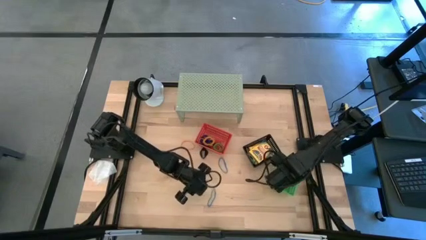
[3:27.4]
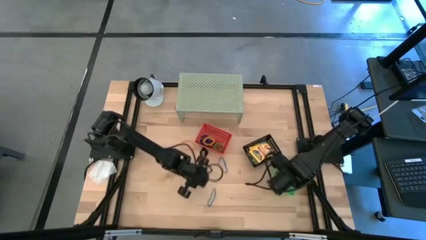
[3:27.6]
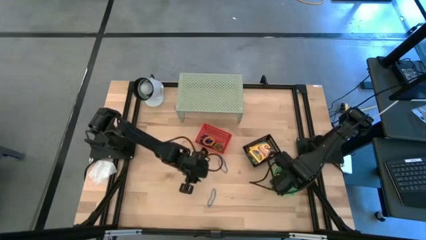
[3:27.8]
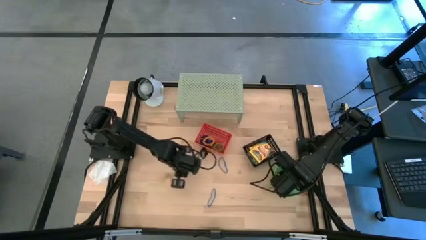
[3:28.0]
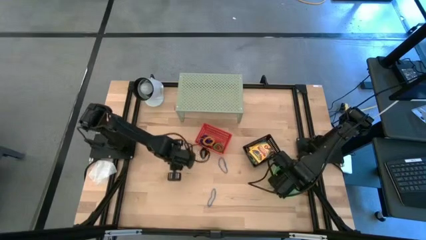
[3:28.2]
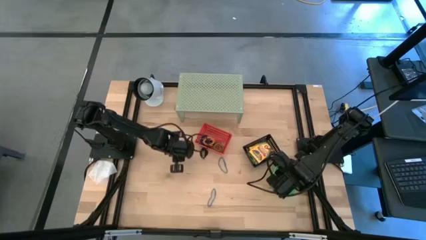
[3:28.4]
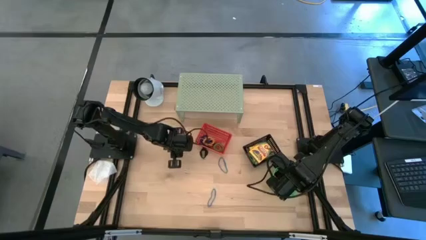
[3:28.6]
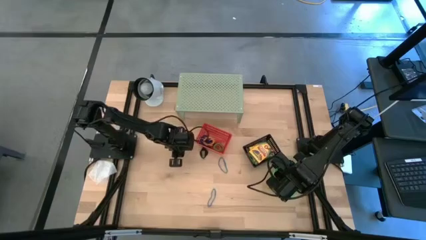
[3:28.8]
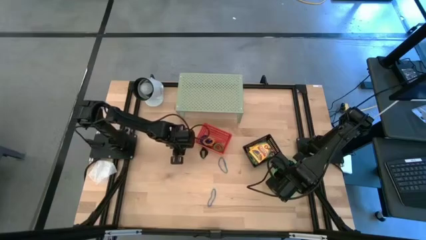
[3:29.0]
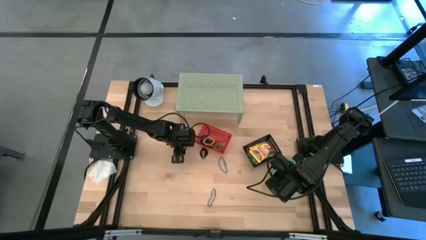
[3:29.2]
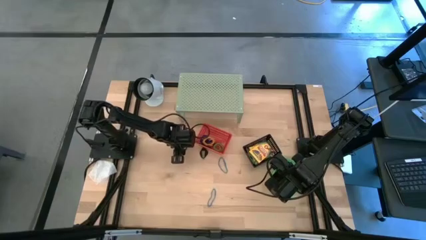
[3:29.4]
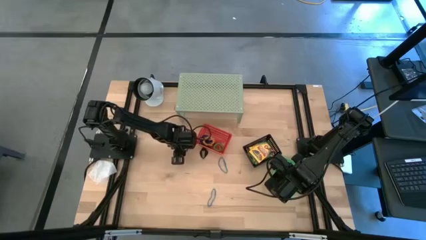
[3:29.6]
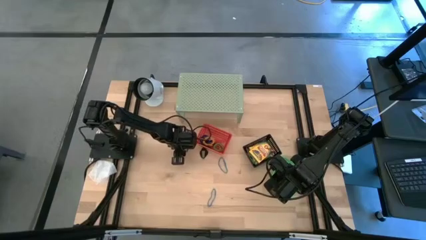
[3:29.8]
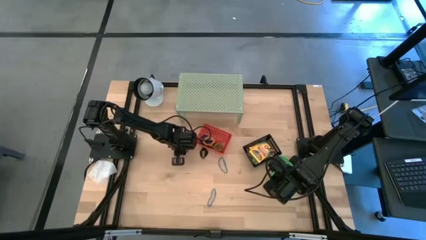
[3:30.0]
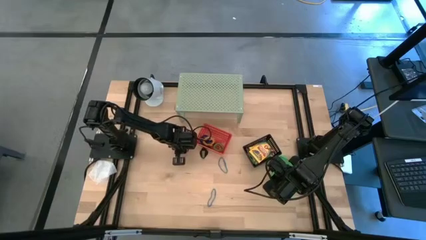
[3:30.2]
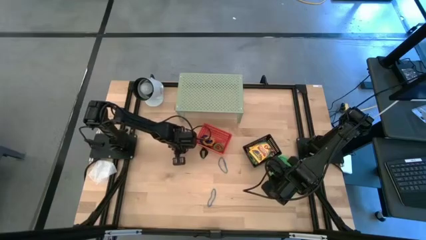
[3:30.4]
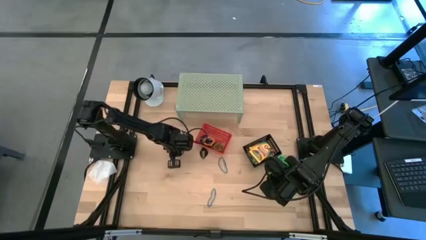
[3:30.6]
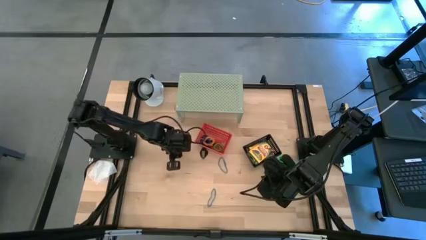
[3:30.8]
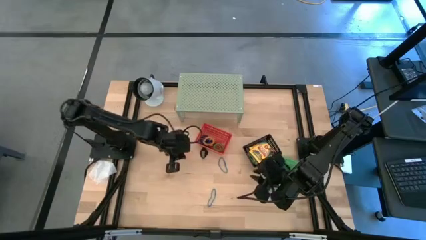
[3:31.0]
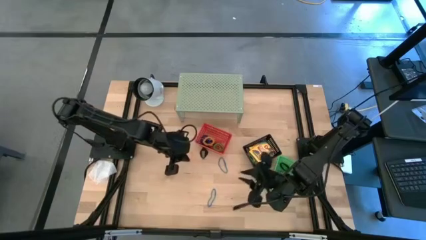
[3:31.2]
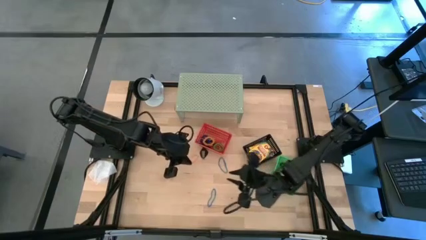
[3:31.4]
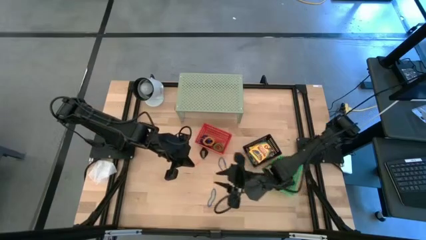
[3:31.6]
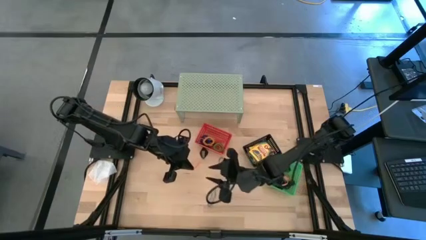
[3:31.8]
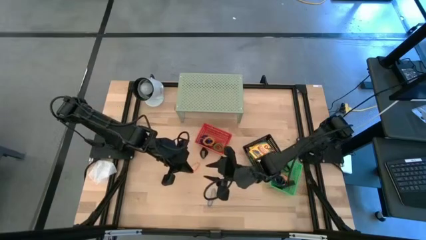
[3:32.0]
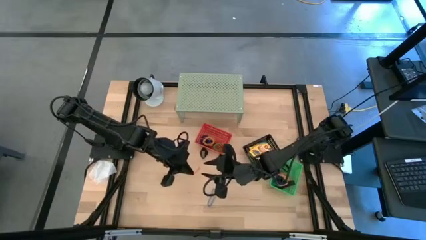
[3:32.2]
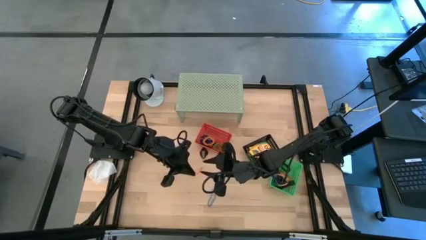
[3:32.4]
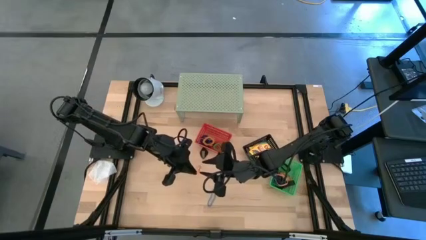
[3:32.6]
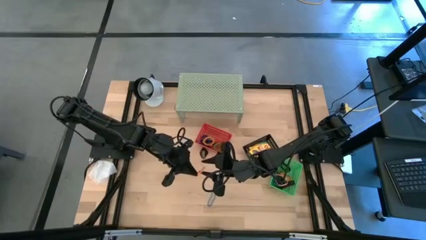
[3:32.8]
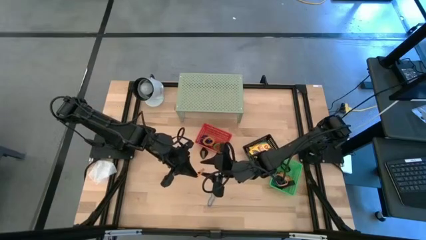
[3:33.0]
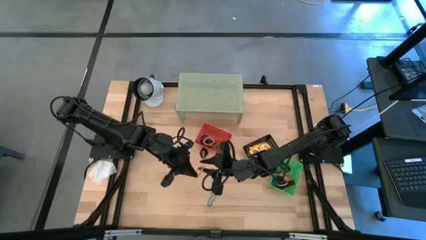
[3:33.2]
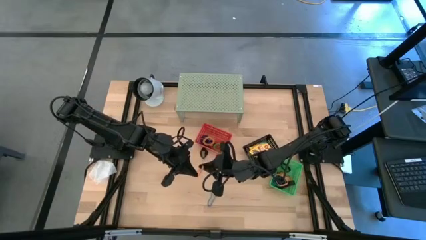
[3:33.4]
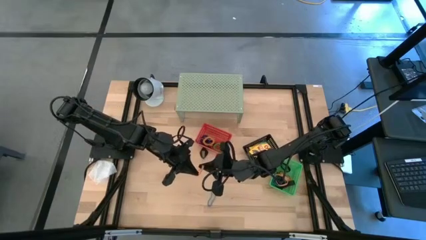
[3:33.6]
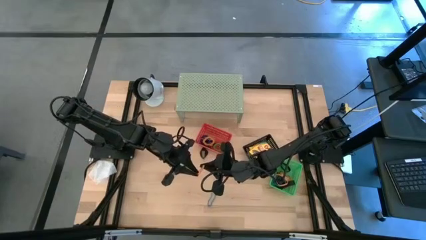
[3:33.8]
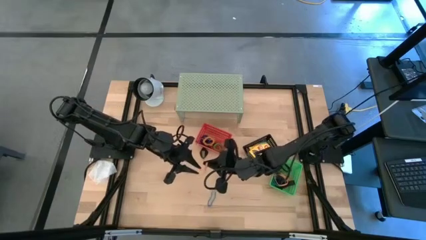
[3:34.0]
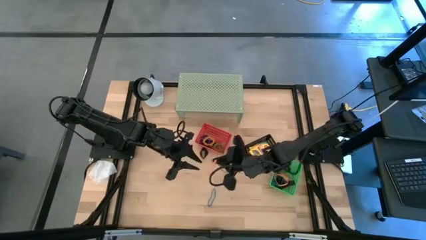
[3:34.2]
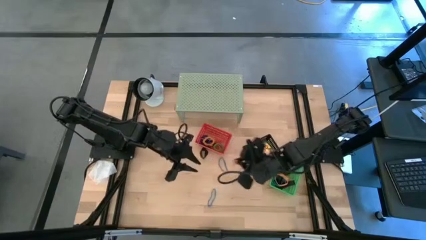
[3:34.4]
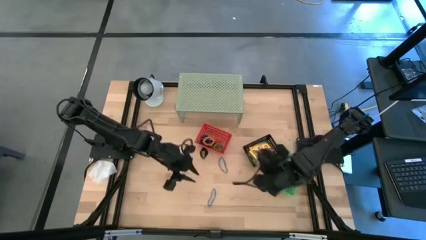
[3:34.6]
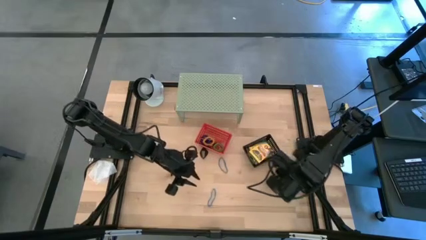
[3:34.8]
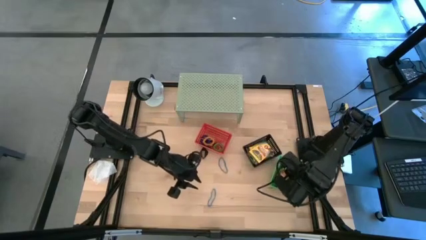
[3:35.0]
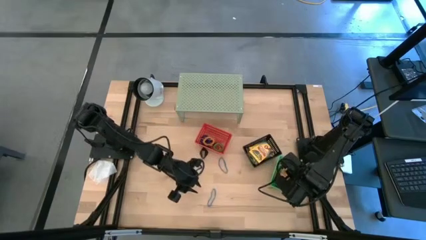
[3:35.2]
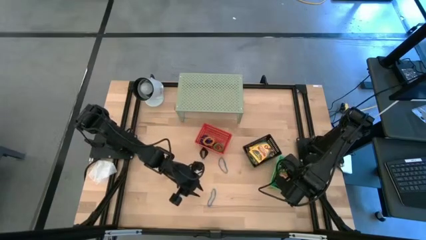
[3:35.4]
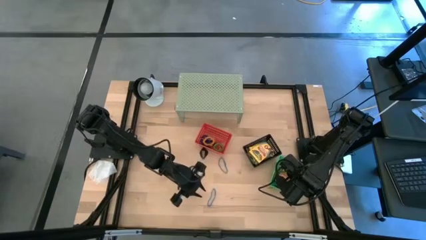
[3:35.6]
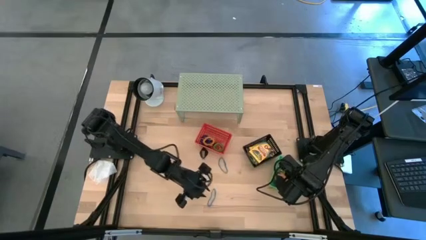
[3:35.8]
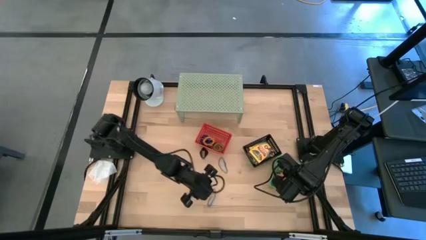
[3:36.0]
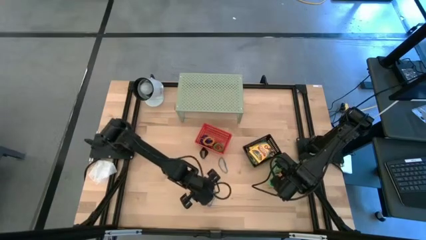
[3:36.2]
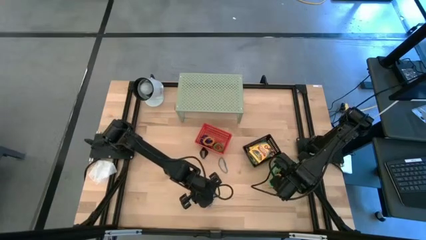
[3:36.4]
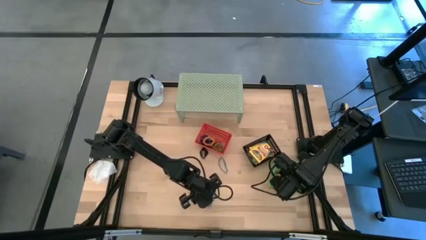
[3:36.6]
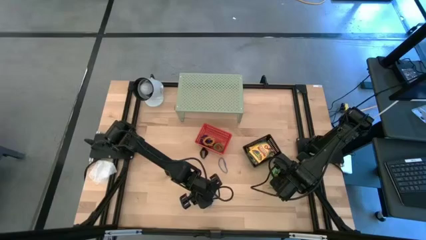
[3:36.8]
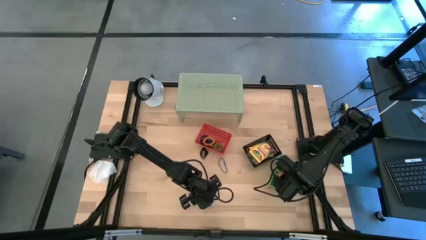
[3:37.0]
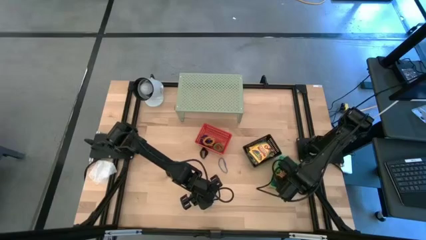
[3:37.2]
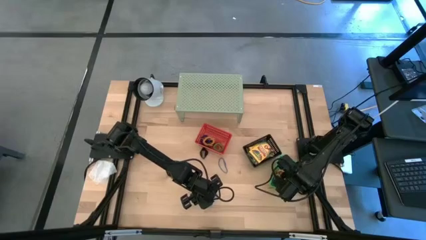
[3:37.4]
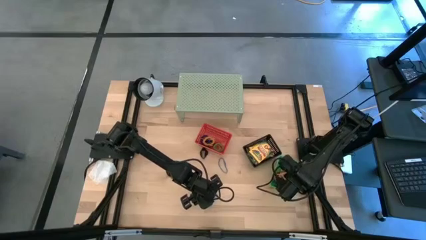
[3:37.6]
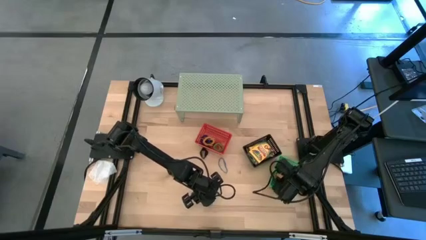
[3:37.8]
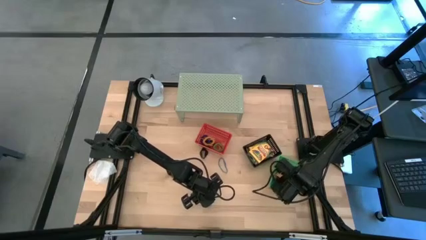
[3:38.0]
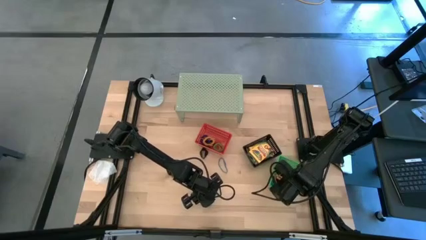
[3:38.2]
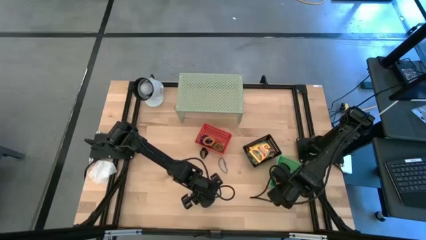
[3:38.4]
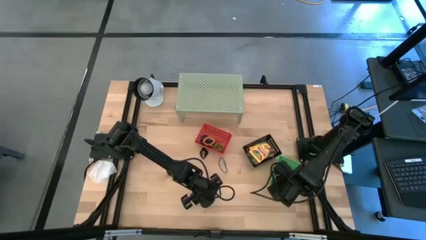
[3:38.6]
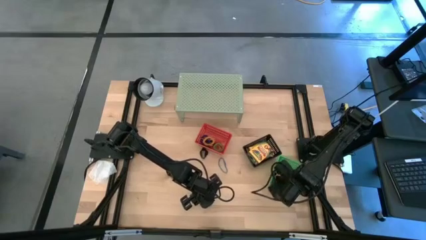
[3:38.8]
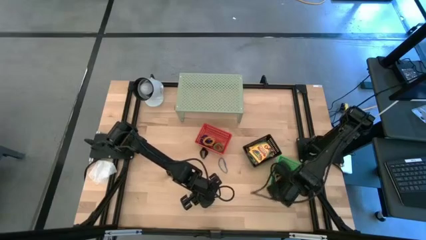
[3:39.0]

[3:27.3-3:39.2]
Task: Pick & Place Office Desk Supplies
Put the orange rubber band into the green bin

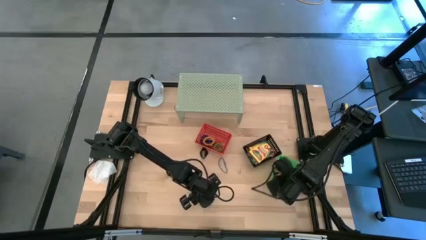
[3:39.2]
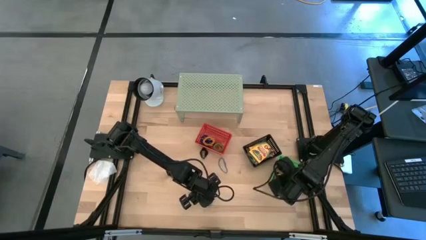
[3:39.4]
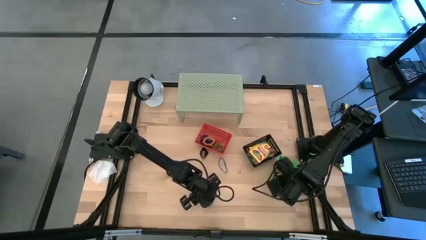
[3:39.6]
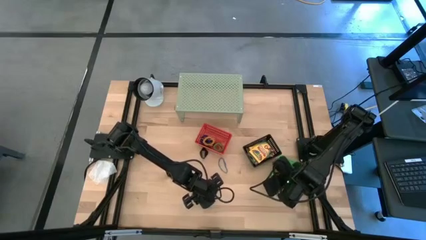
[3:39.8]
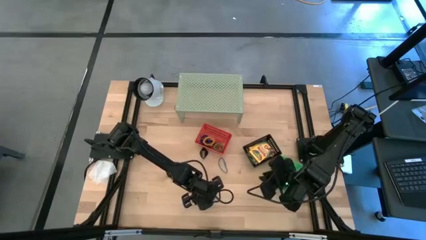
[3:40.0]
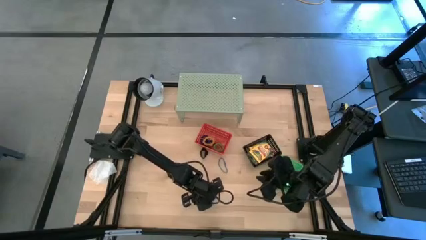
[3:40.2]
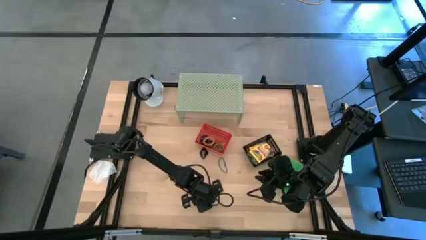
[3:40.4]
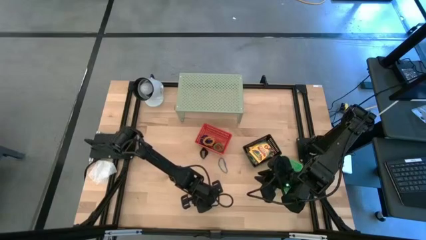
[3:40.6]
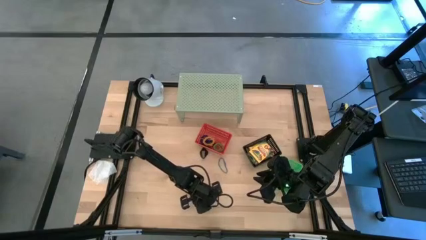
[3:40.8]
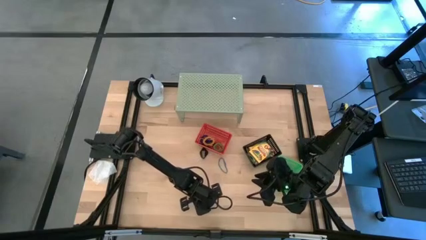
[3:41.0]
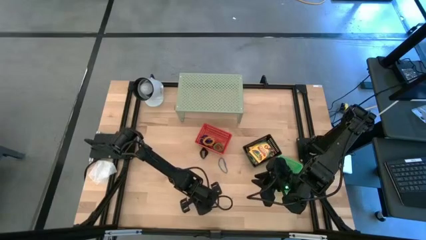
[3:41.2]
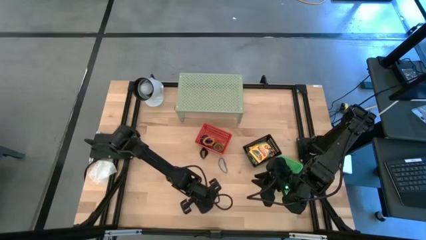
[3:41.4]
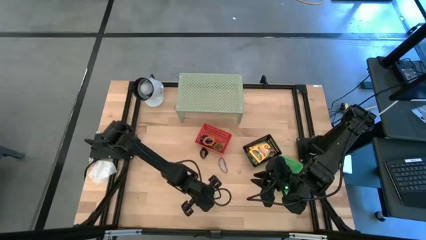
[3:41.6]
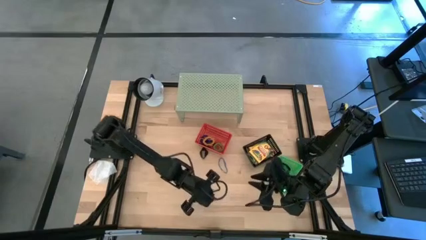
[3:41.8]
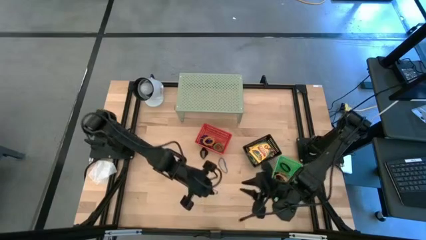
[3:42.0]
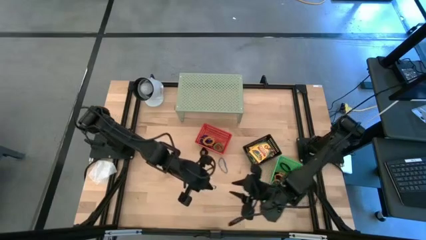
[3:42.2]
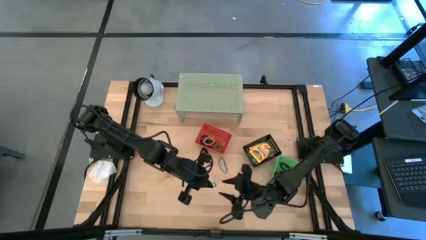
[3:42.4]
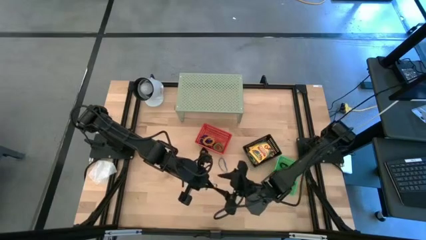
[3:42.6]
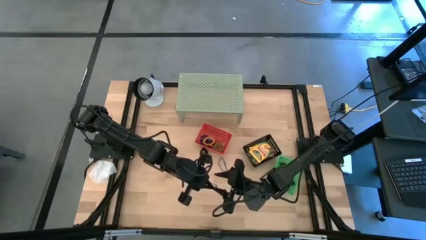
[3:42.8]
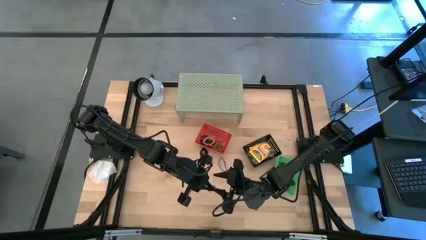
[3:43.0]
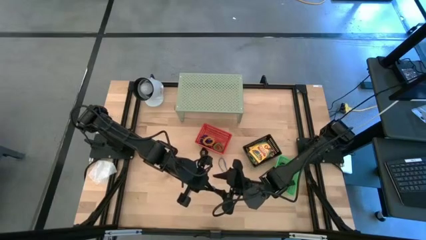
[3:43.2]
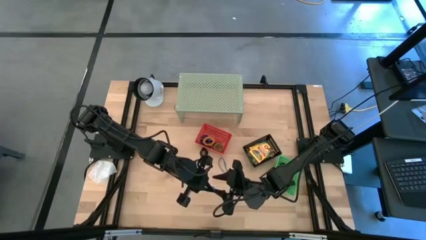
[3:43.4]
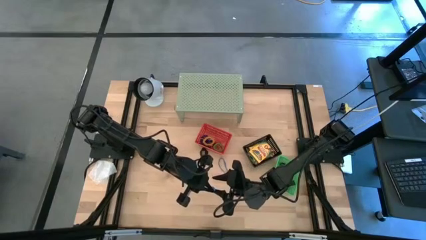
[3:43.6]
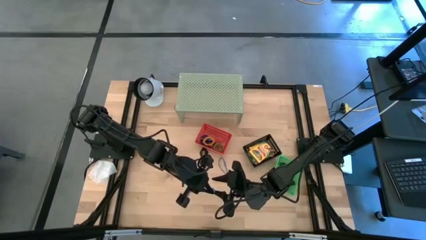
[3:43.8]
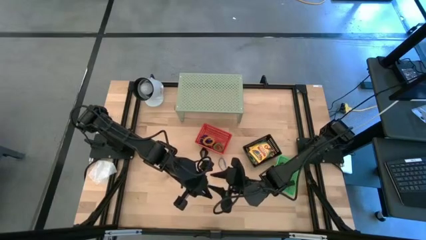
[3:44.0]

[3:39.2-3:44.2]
Put the blue rubber band into the green bin
